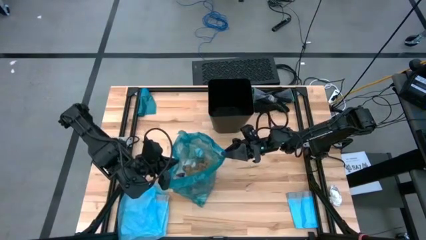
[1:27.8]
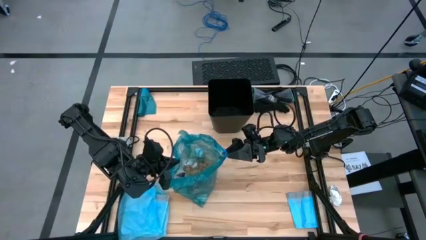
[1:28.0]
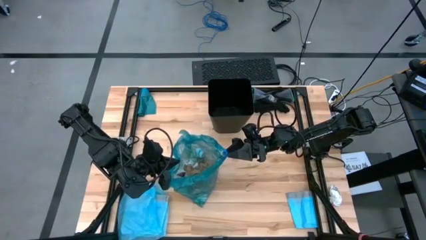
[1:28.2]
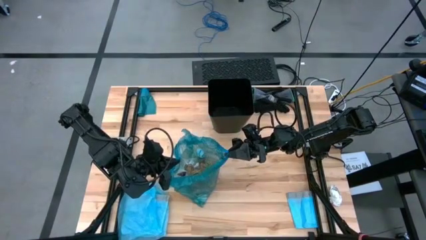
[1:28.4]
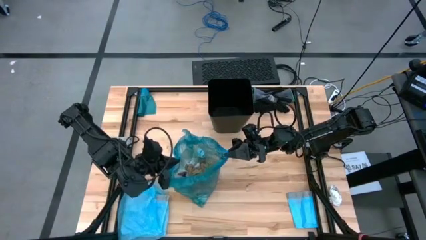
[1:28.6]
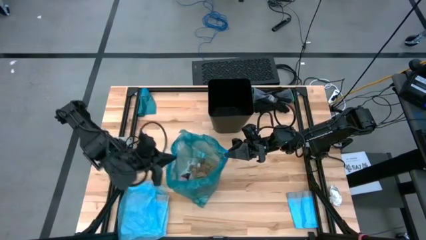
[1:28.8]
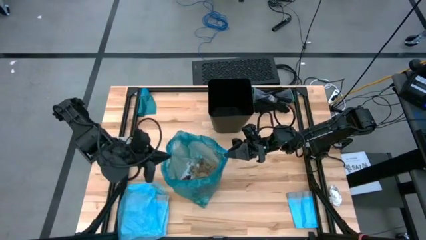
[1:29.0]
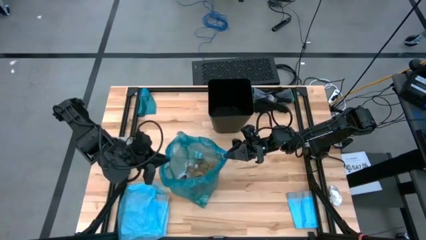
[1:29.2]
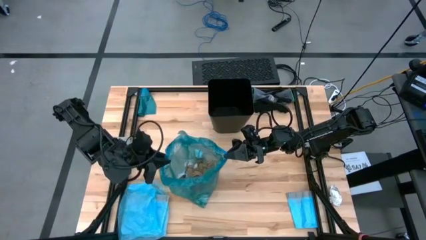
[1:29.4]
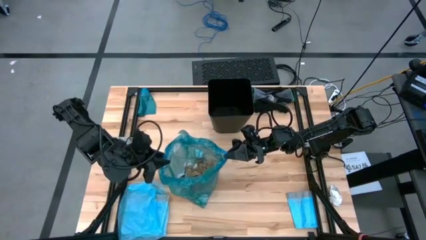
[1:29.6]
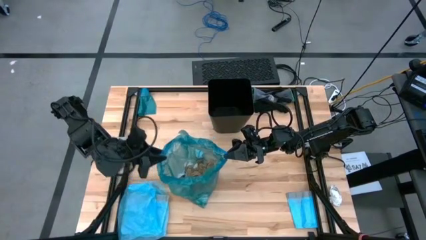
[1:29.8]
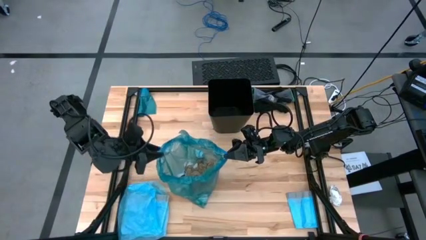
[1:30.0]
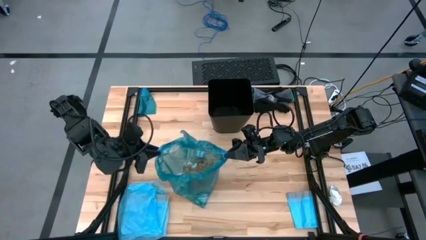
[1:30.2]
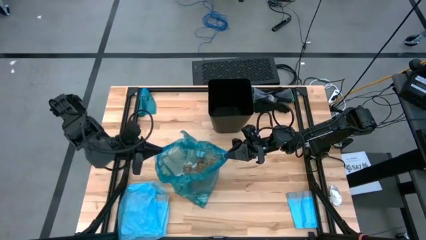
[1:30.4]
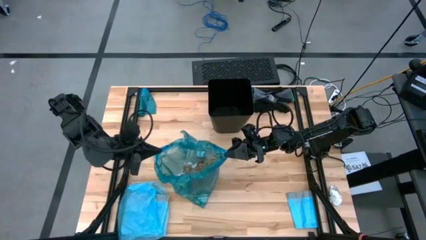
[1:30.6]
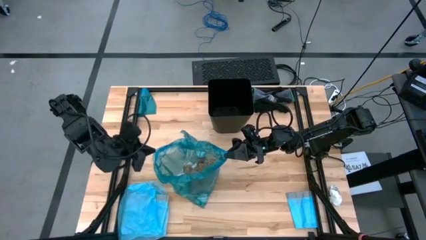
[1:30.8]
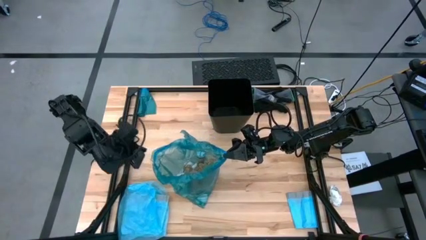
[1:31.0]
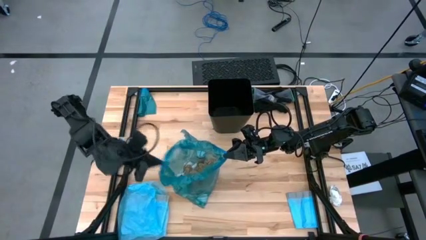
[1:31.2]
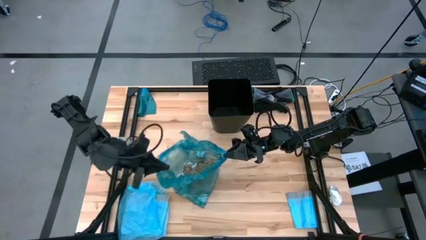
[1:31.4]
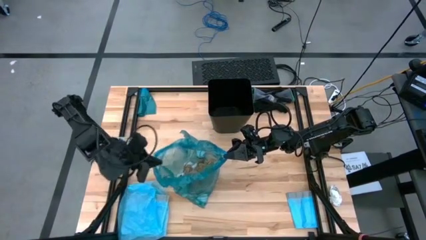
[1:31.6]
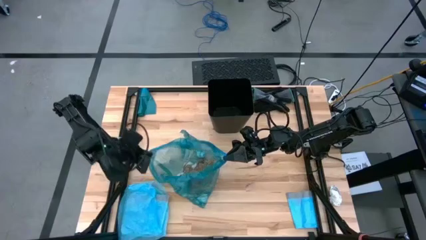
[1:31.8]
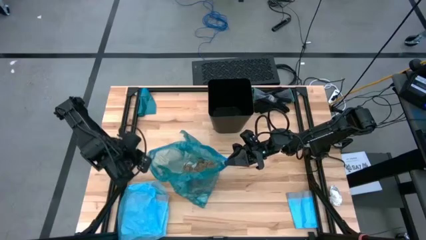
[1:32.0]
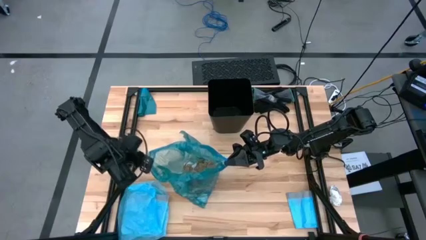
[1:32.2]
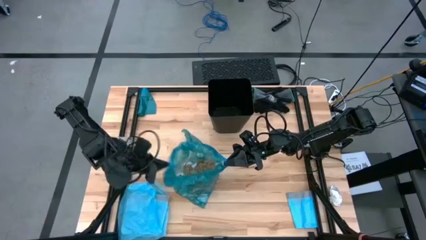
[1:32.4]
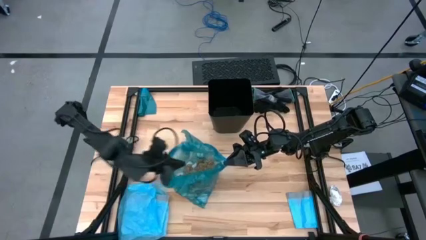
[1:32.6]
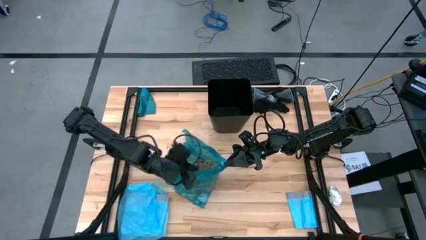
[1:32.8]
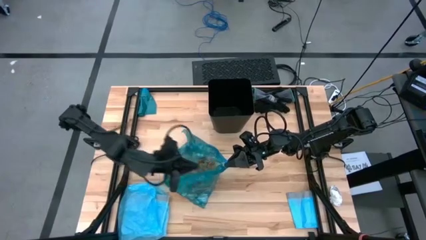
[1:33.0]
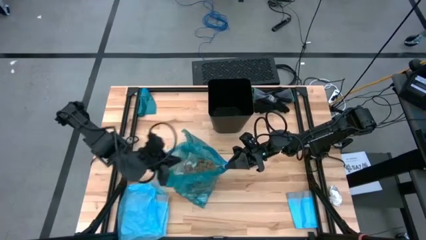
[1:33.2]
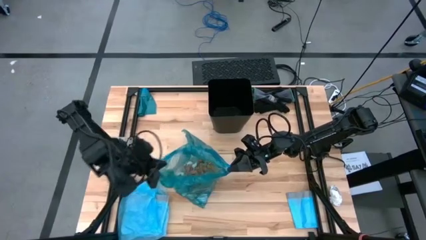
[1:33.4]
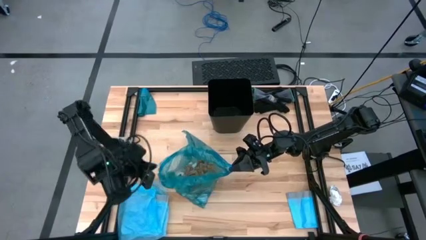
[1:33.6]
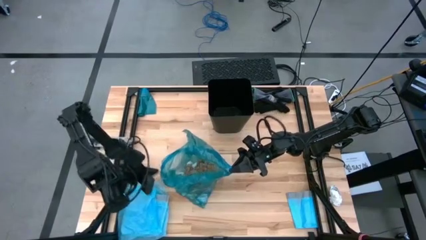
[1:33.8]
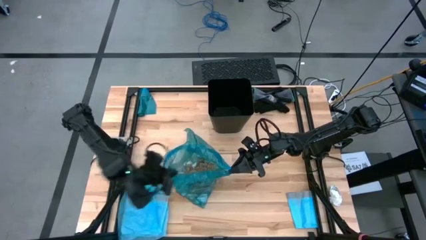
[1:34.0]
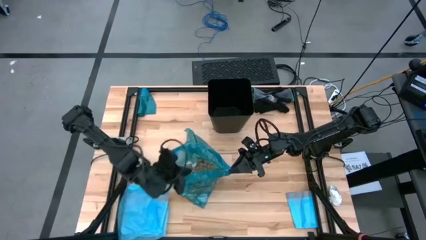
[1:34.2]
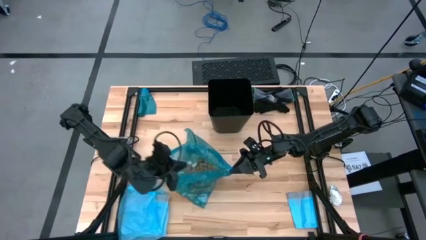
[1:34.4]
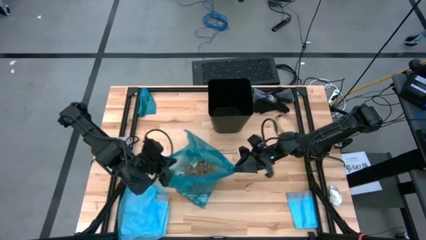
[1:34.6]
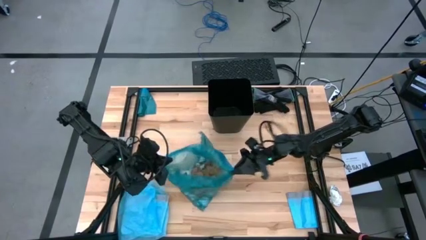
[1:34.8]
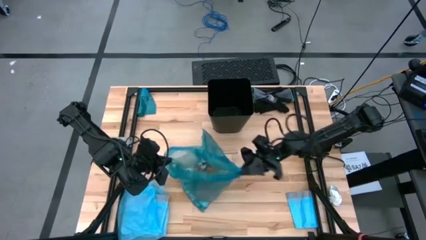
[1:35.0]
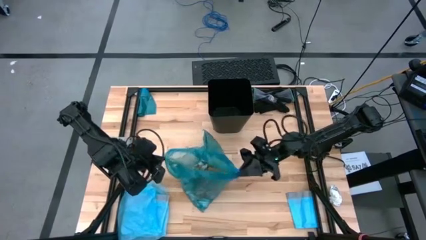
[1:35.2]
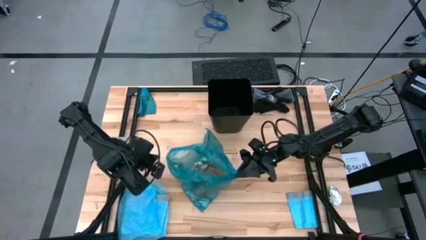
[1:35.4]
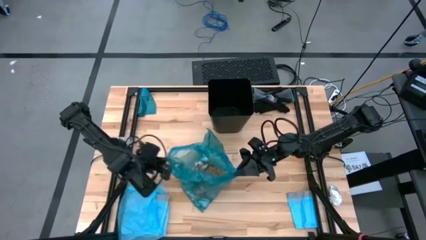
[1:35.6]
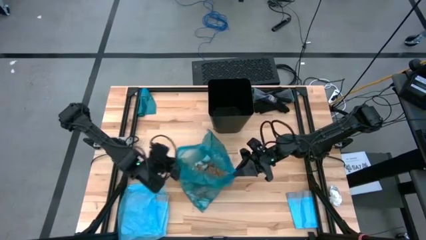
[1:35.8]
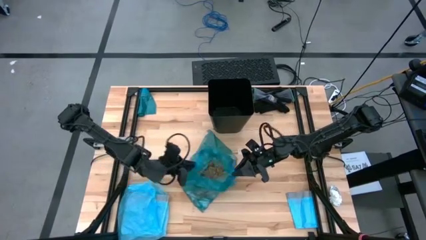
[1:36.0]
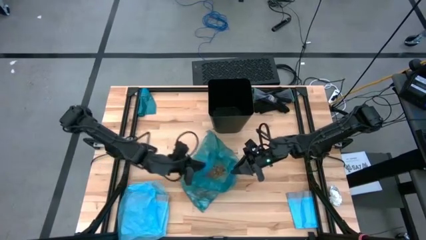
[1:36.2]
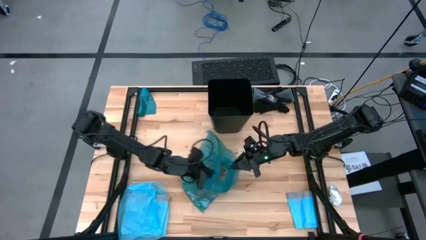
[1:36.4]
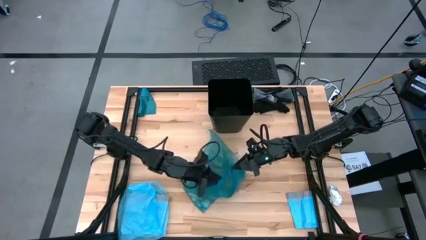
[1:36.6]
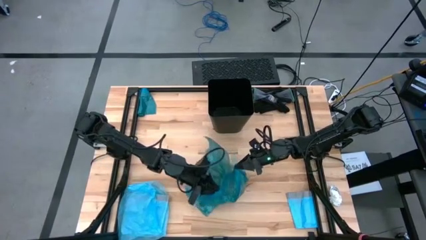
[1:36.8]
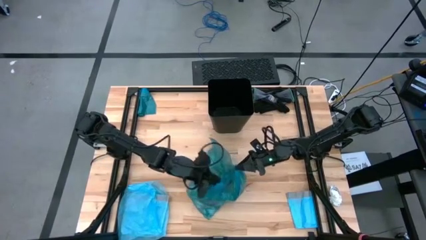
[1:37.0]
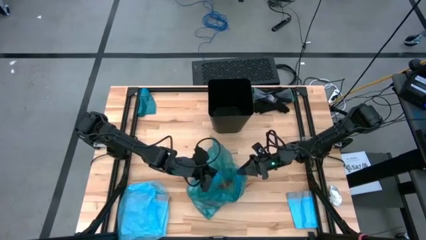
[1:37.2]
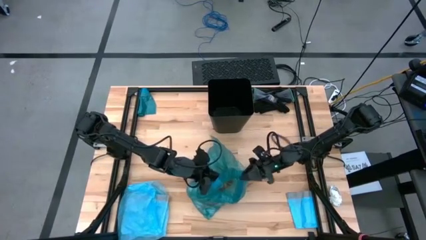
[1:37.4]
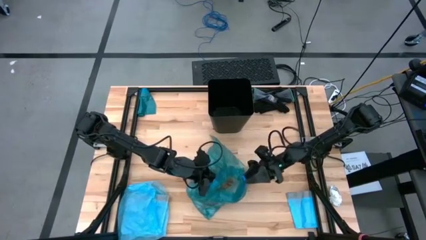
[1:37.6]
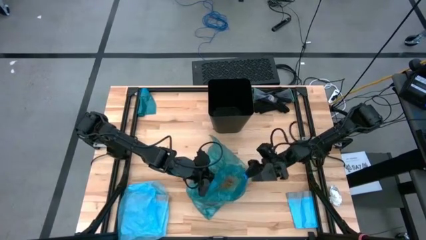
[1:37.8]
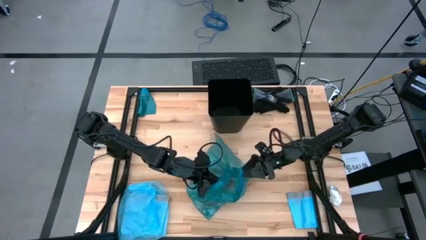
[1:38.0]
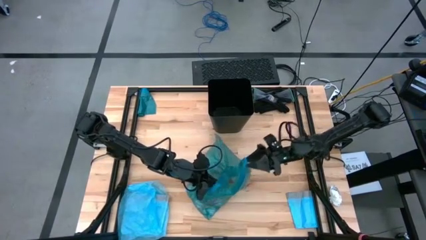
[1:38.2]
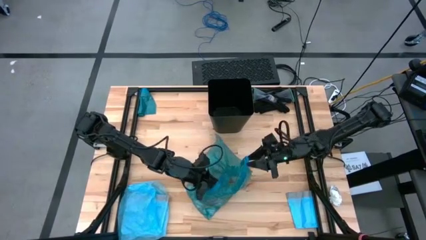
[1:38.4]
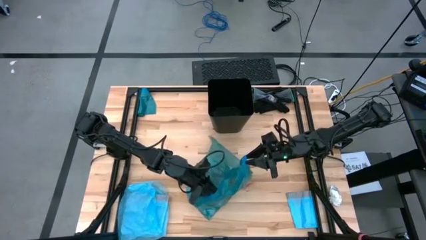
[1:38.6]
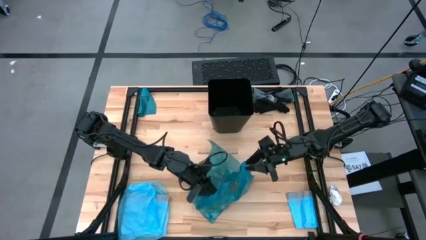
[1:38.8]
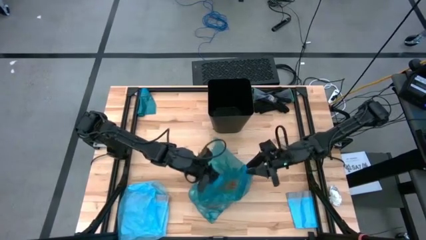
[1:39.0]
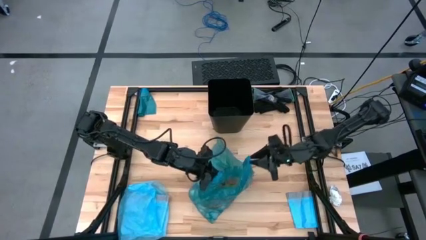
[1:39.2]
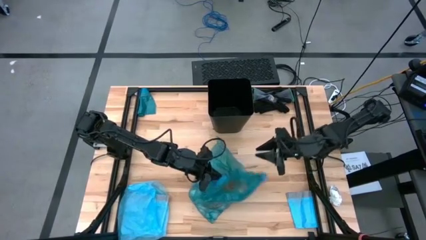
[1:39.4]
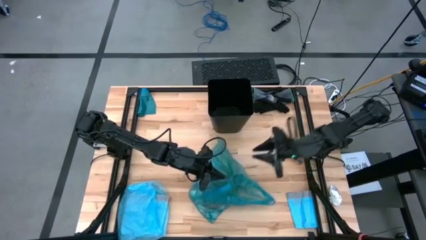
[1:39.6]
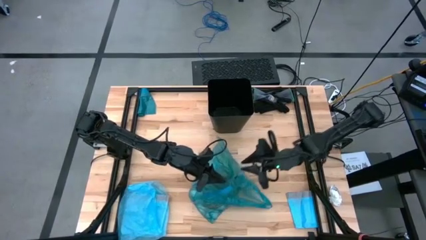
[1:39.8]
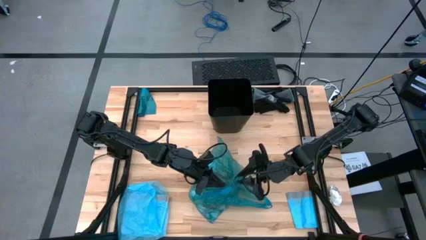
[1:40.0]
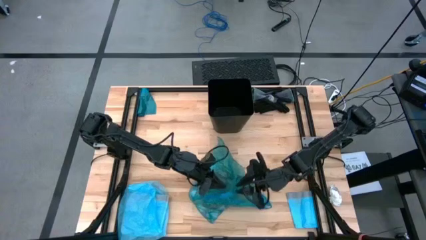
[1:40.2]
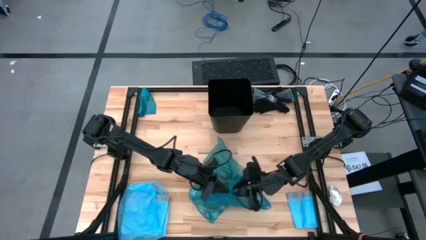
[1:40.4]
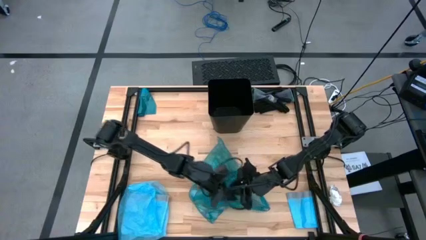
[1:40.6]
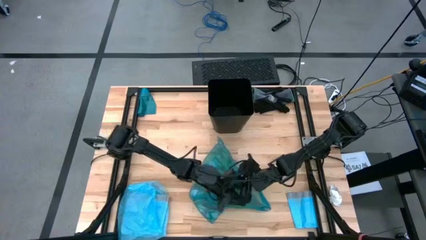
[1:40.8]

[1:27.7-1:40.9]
Task: place trash/remove bag and relplace
Close the blue trash bag

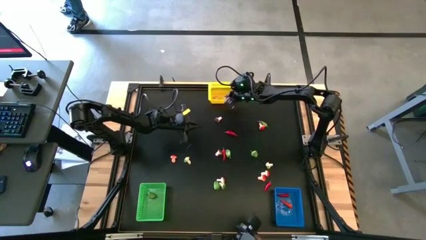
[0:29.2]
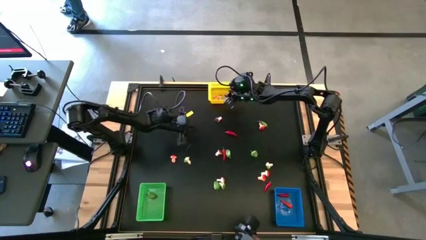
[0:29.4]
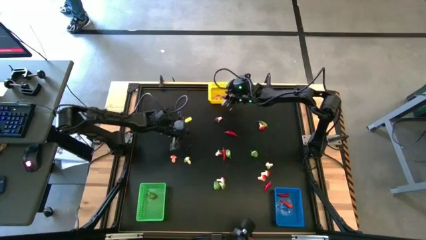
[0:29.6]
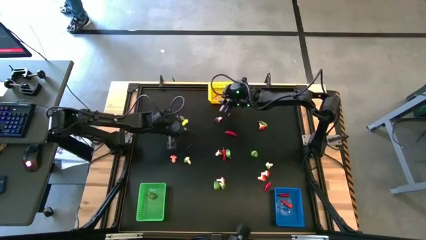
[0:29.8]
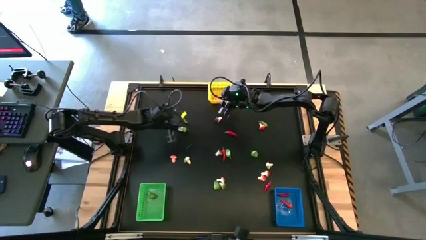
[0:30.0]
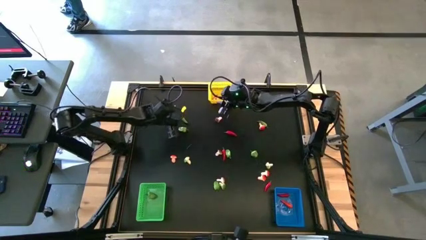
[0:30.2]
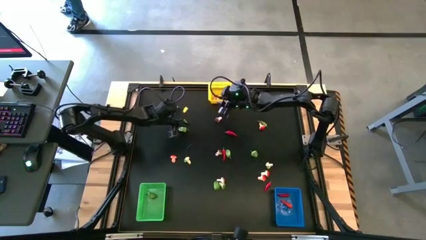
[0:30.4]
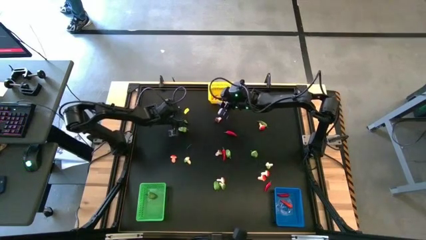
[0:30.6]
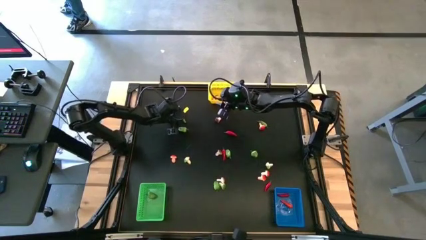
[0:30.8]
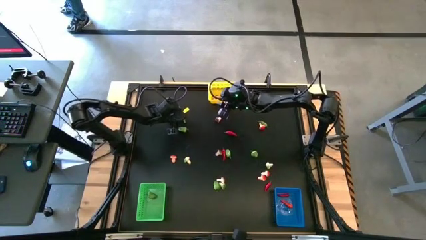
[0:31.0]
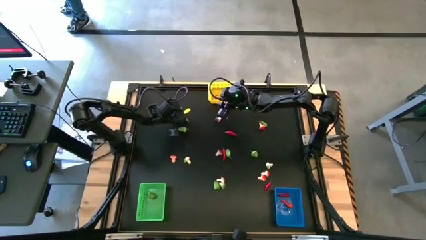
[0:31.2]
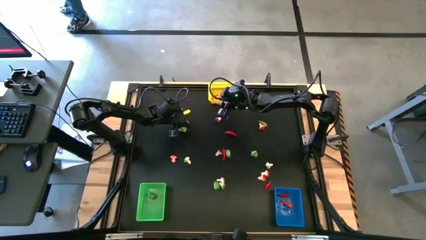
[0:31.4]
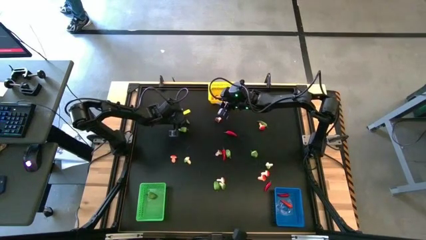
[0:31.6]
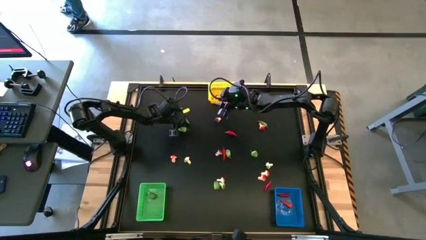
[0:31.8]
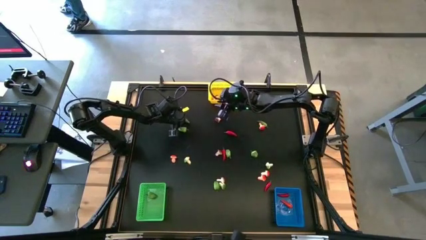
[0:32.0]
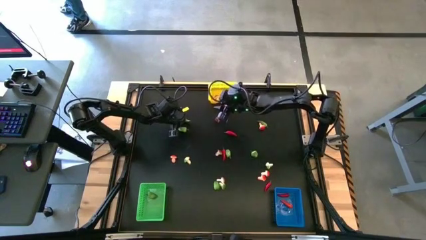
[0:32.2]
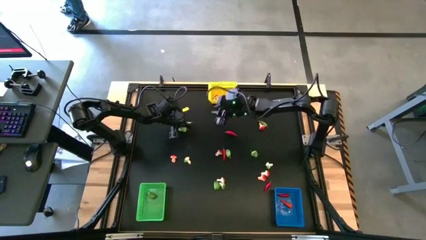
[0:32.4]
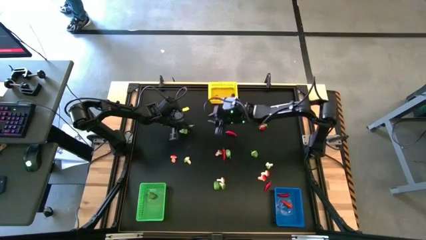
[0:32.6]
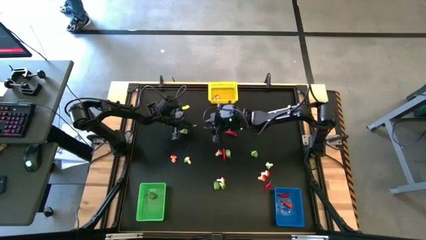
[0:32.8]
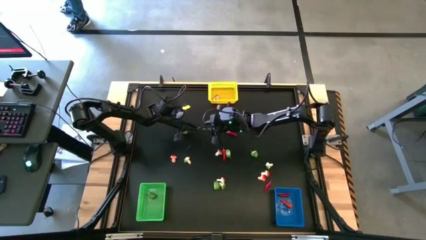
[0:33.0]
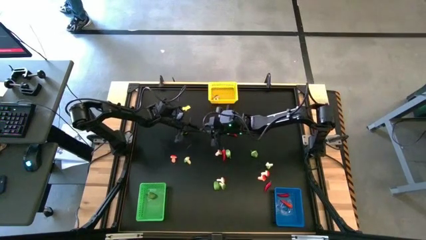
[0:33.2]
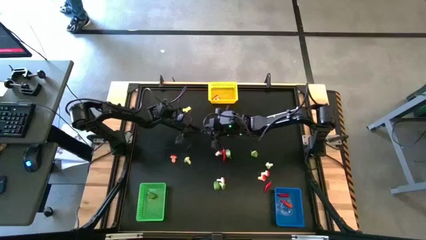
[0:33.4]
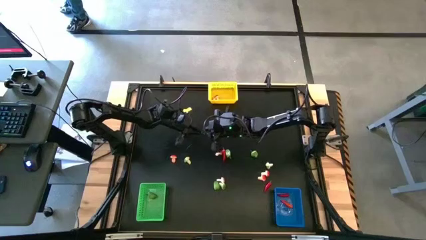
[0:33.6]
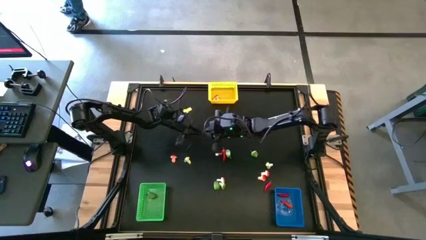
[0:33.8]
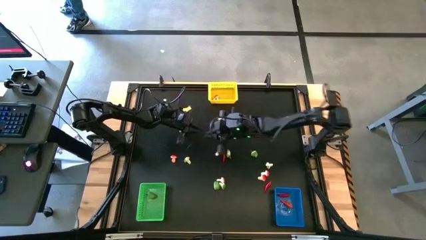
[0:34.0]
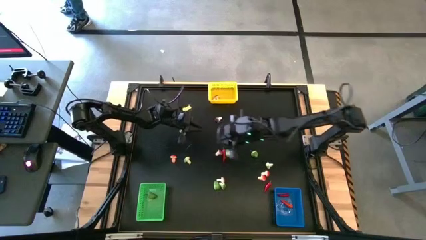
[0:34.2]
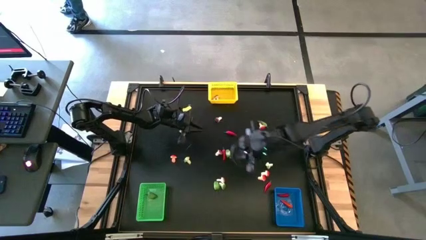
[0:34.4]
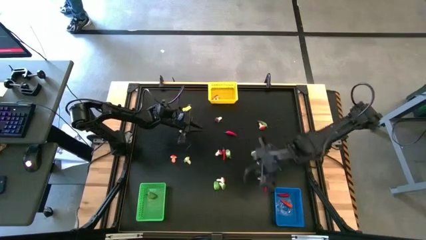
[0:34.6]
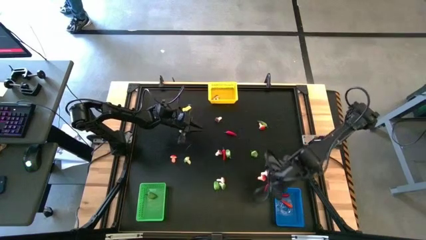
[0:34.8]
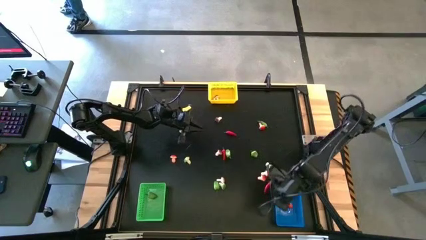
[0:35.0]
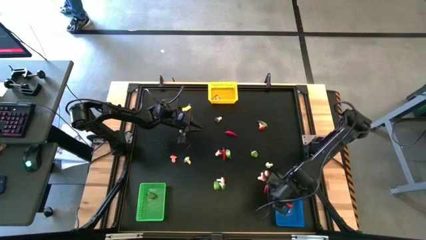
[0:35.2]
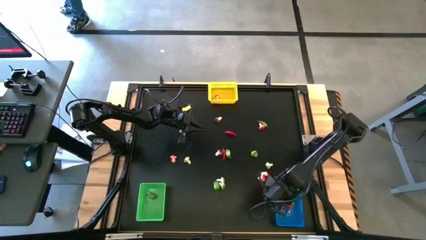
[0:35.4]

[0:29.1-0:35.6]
Task: Sort produce into baskets
Put the top left green chili into the yellow bin
